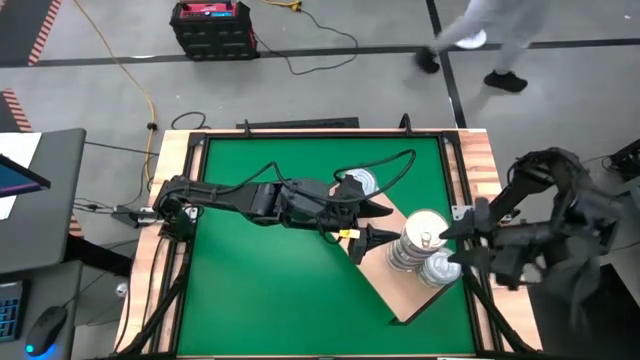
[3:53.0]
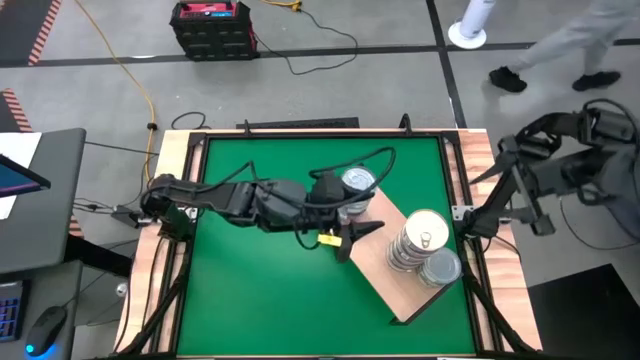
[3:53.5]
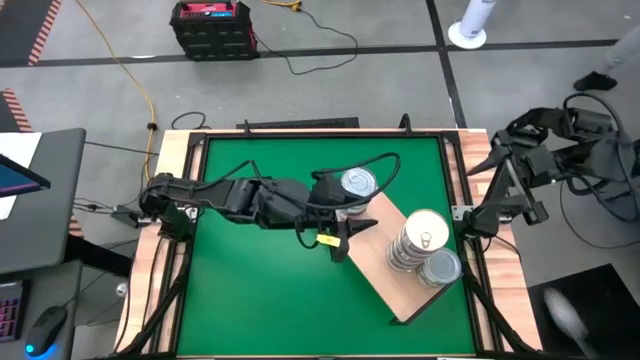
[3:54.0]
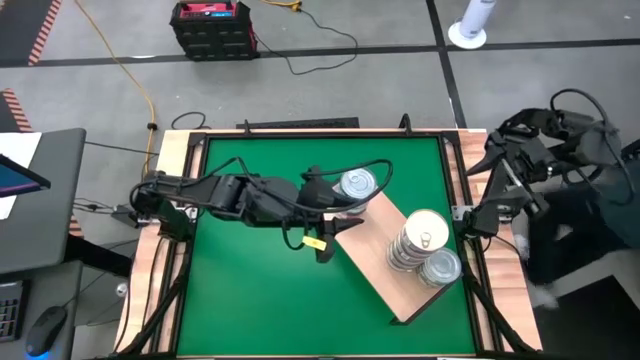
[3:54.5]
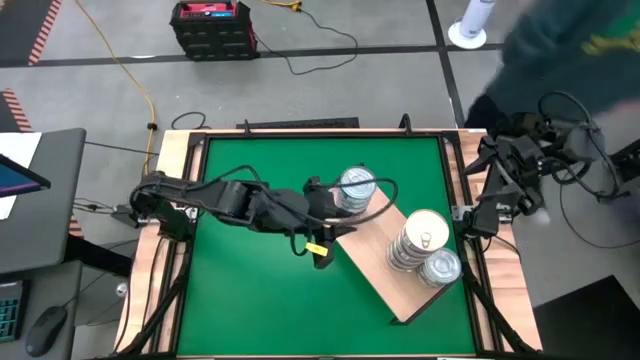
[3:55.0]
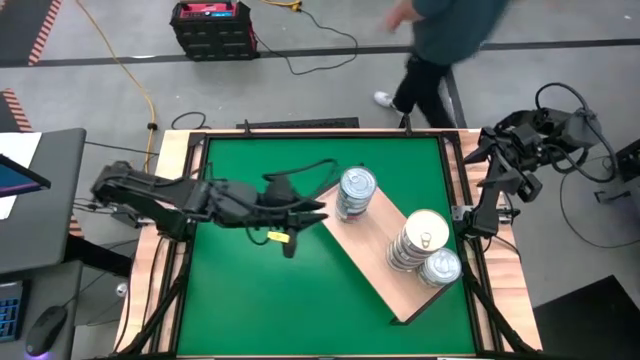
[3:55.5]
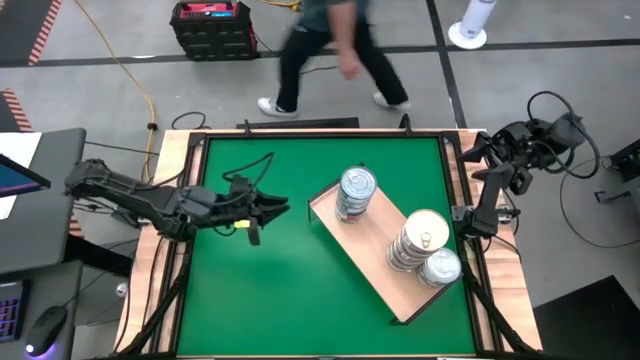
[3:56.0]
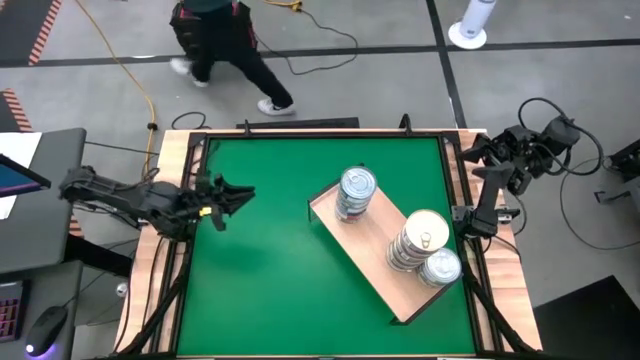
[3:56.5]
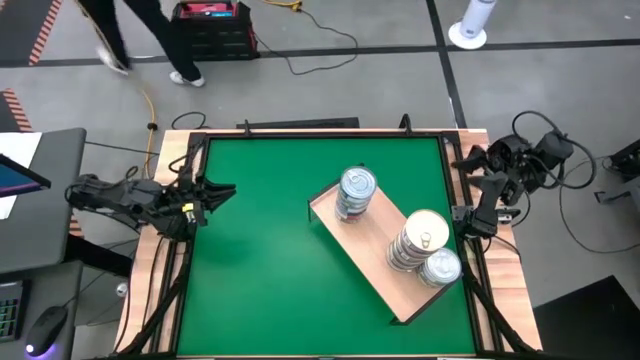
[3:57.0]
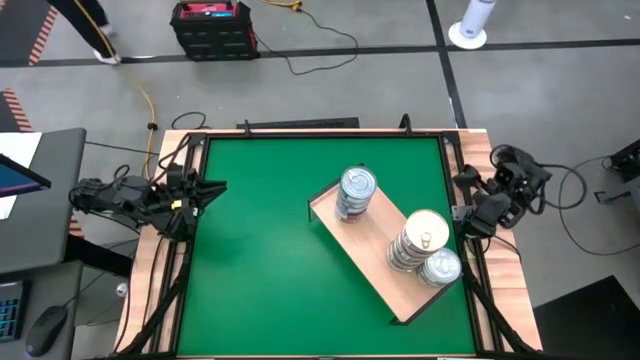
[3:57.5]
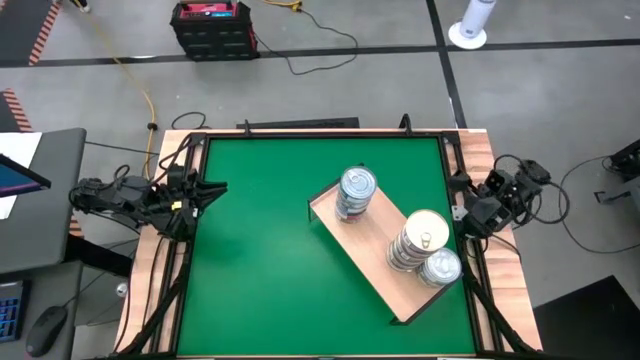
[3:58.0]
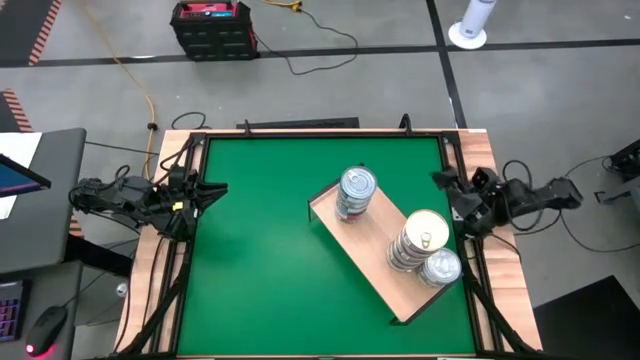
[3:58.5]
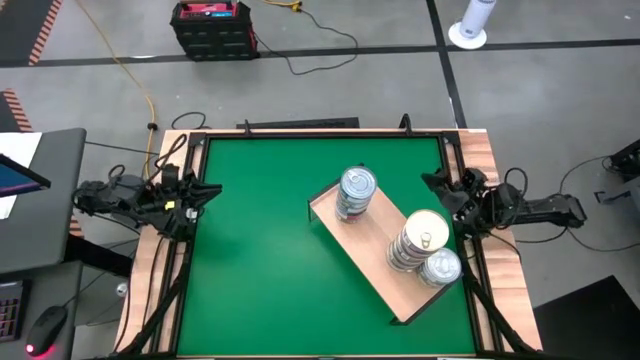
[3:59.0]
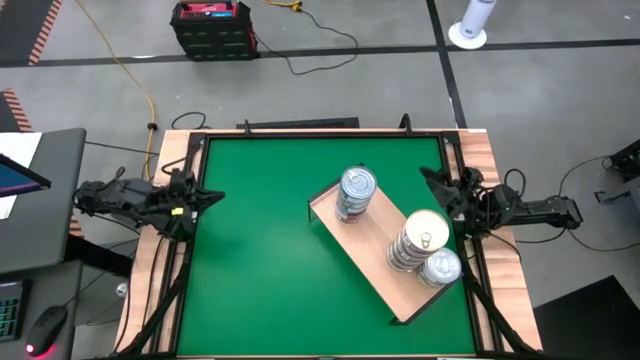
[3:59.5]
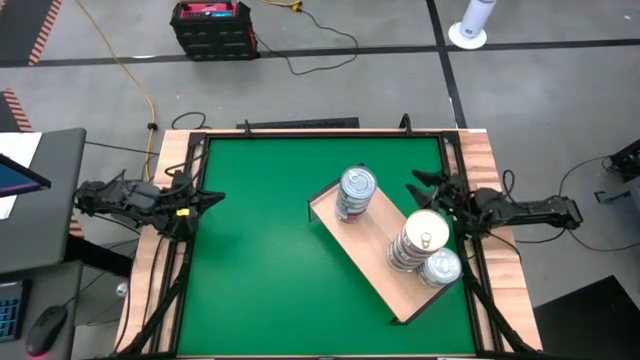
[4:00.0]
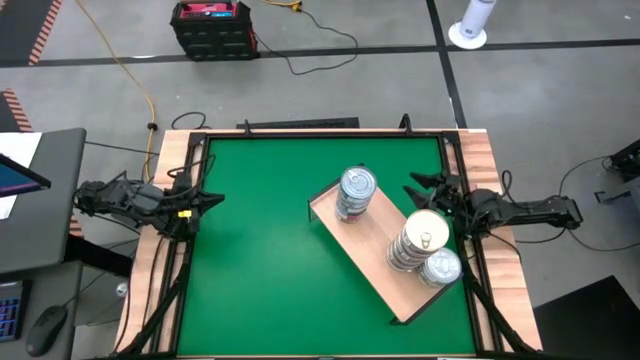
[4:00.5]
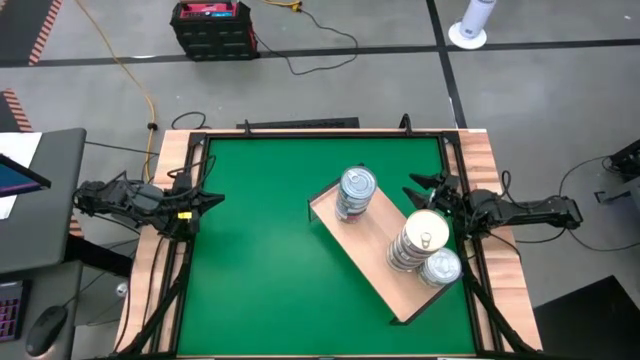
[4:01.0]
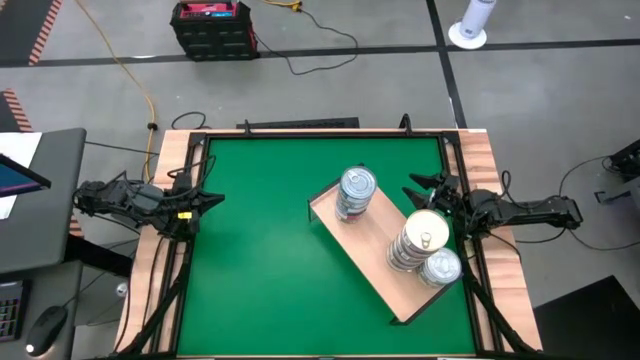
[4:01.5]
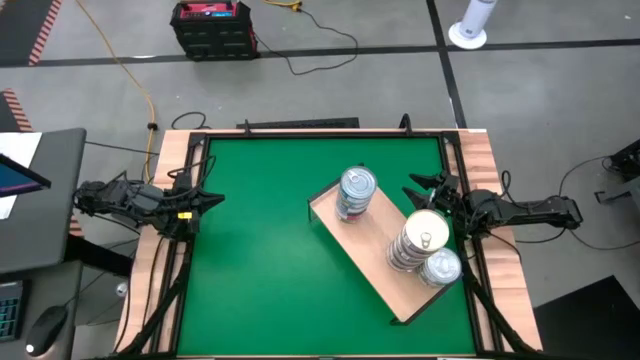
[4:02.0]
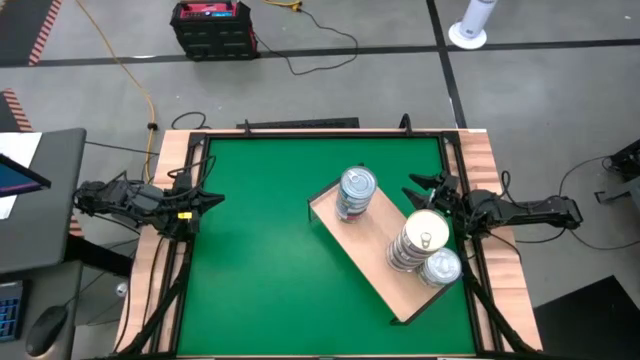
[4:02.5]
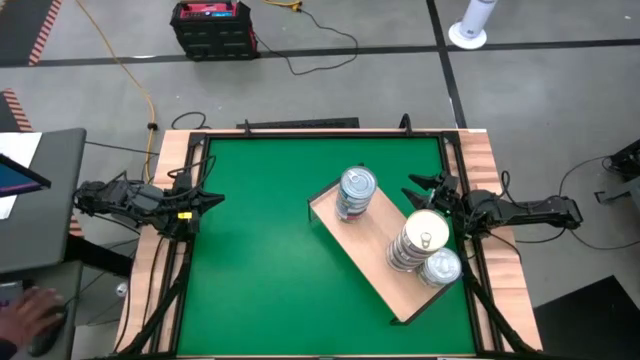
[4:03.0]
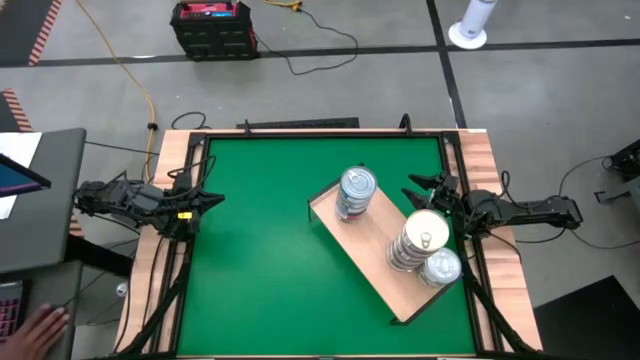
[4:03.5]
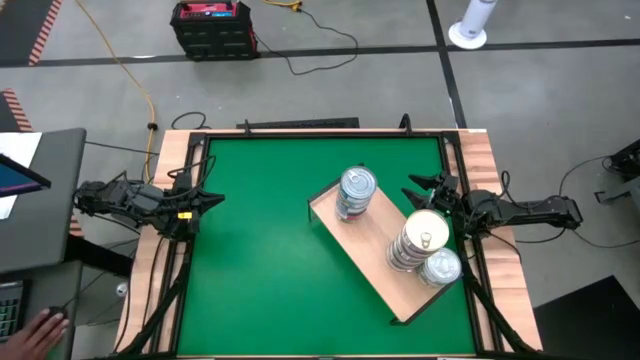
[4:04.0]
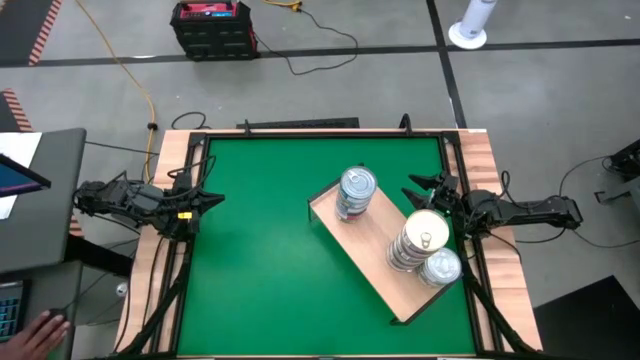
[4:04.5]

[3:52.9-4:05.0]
Task: Stack canned seafood by type on shelf
Return to Home Position

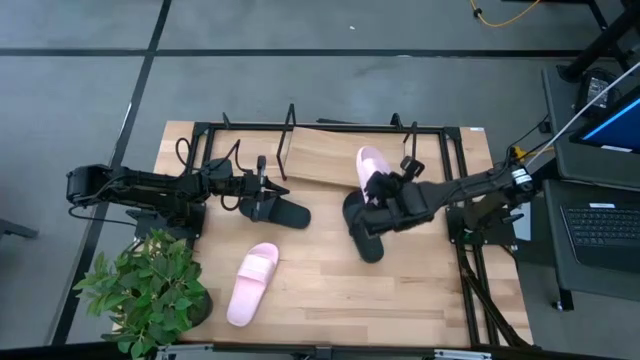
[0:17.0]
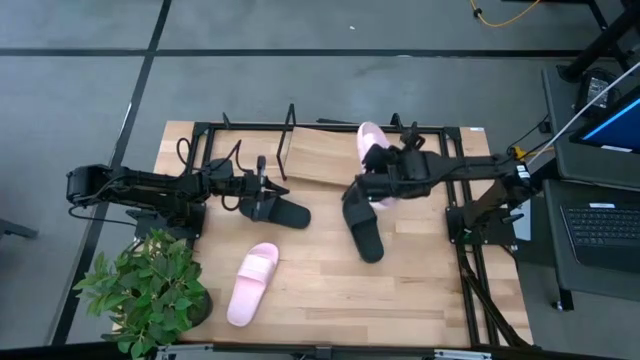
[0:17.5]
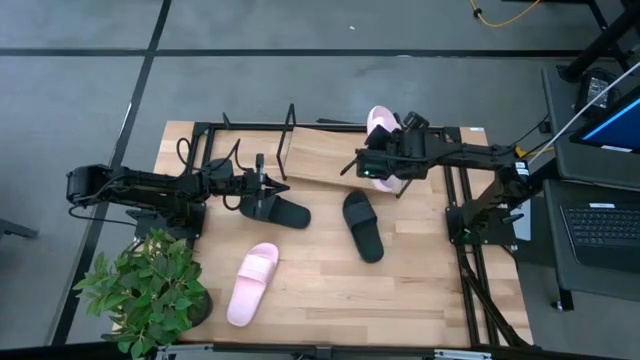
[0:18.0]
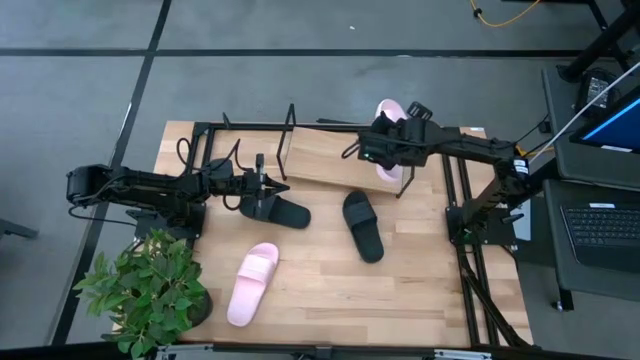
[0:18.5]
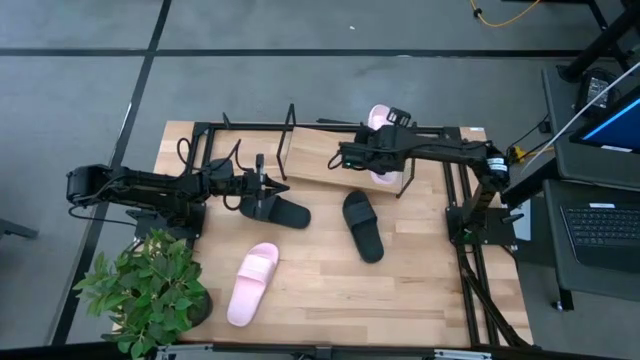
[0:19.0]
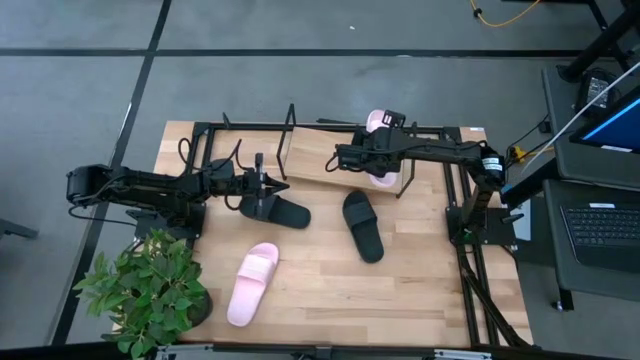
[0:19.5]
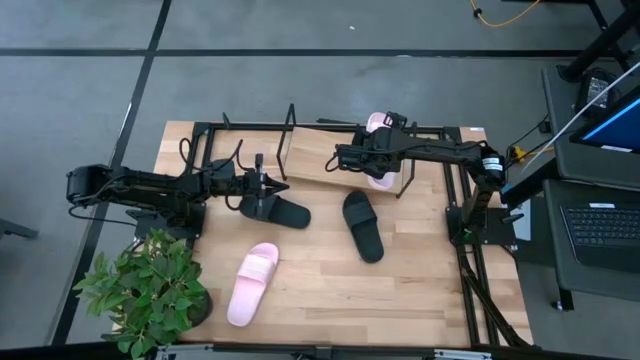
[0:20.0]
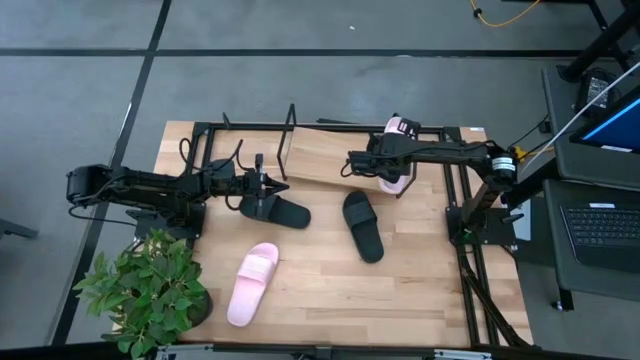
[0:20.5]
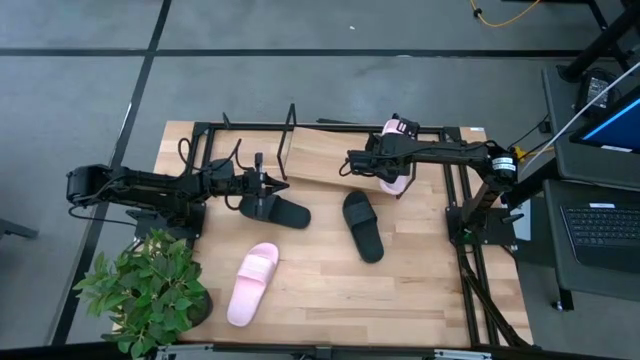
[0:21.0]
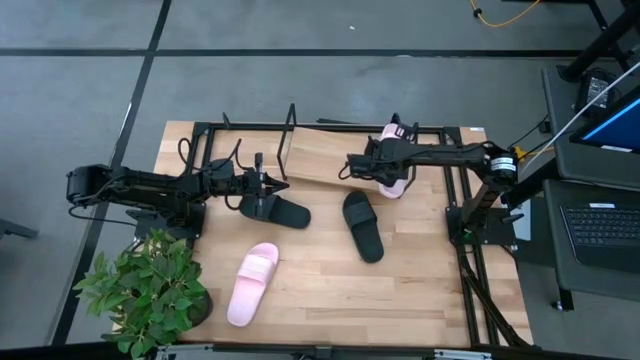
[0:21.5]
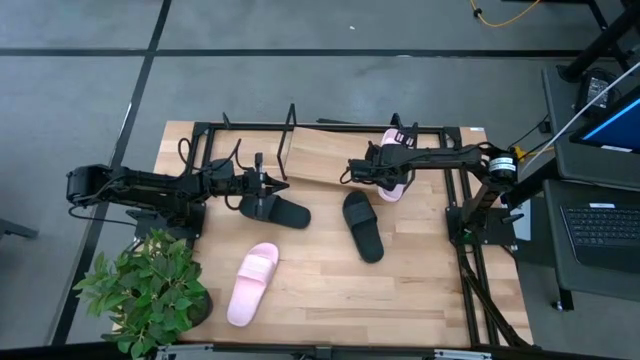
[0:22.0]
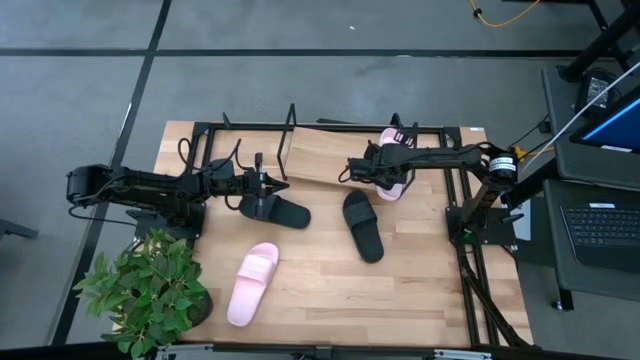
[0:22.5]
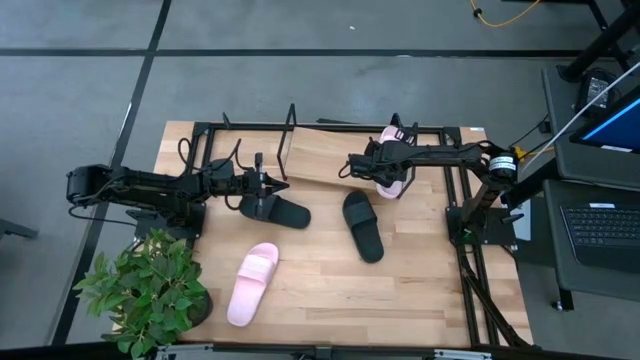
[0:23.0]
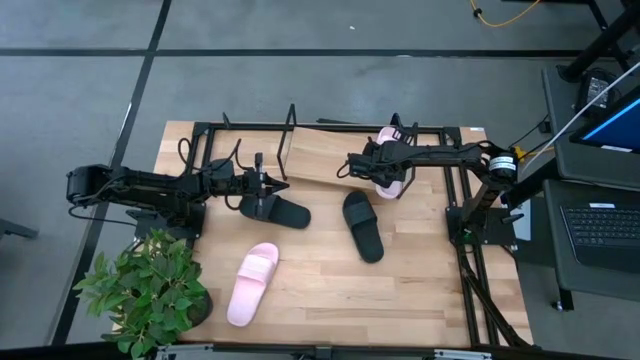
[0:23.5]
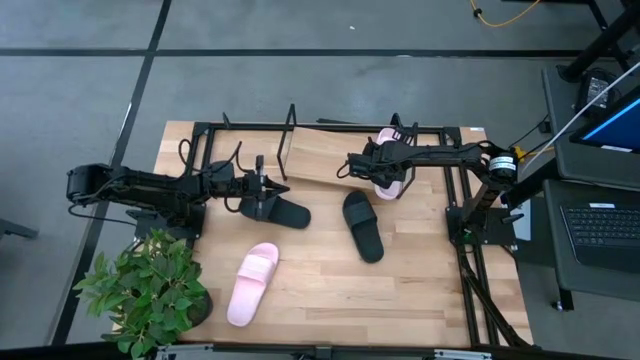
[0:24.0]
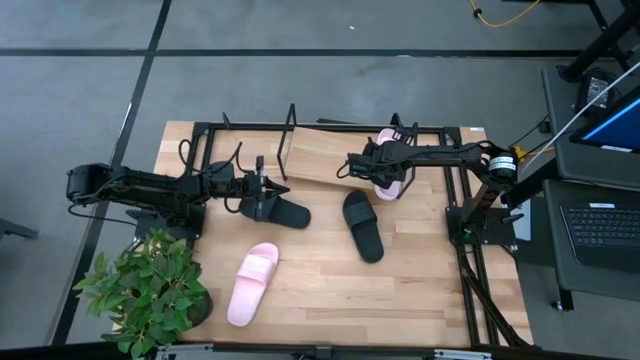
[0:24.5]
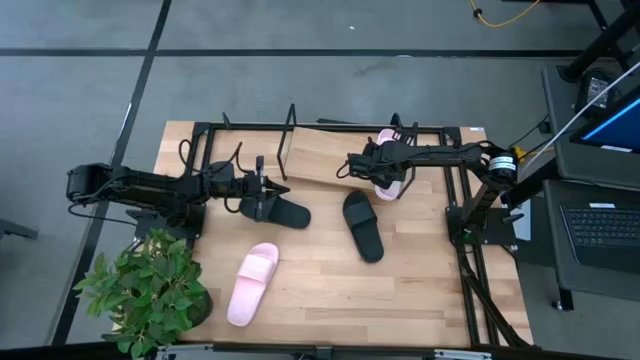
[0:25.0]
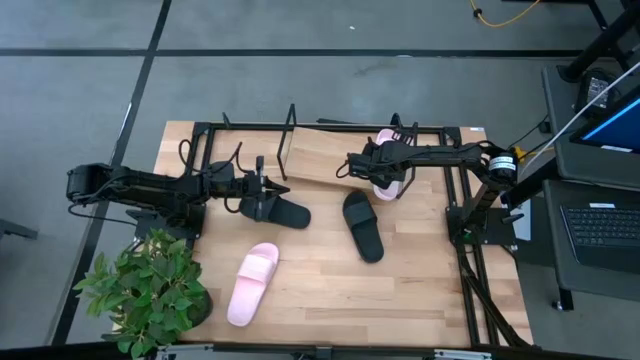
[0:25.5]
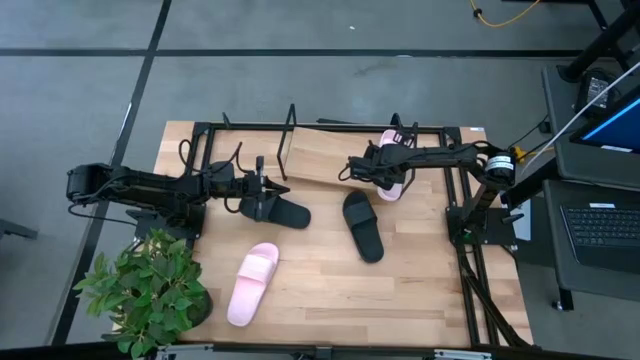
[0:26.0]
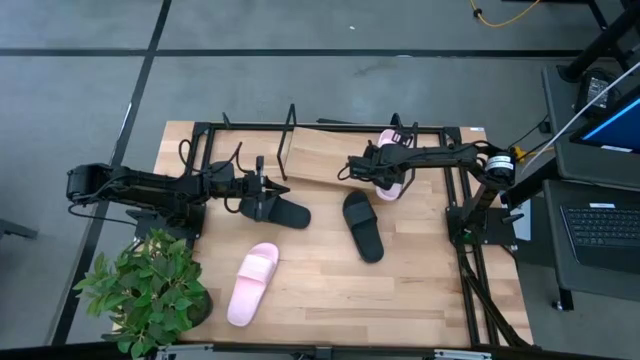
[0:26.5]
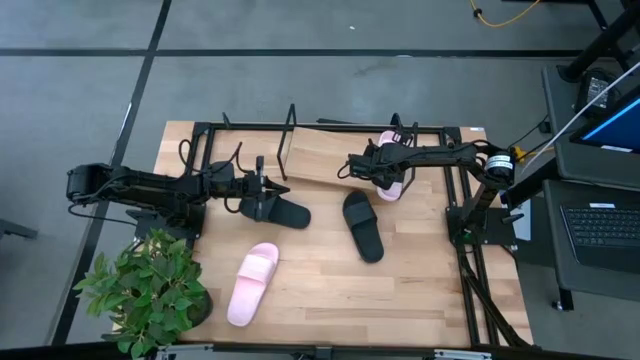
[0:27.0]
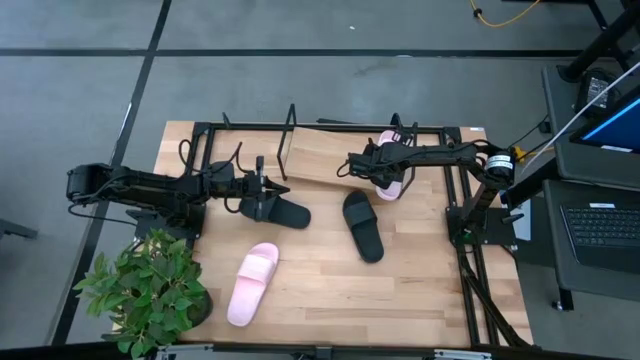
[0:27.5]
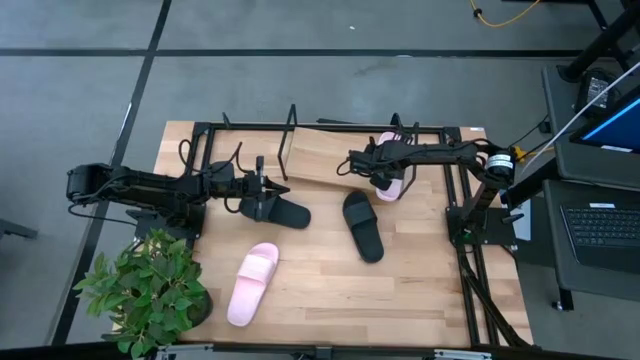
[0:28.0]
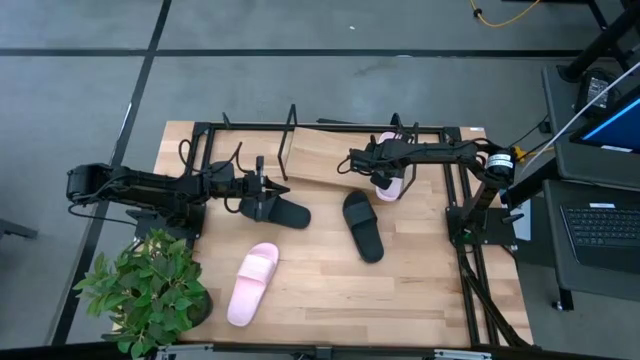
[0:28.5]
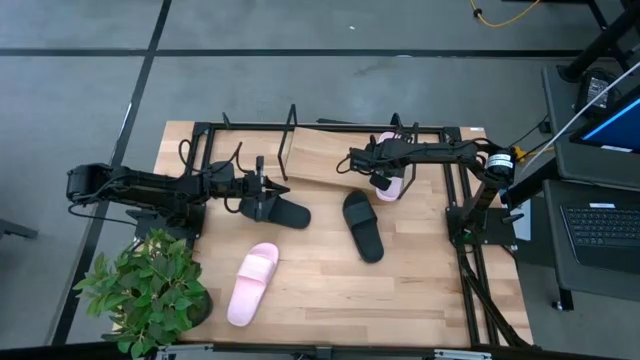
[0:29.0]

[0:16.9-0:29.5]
Task: Pick and place slides into the shelf
Put the right pink slide on the shelf
